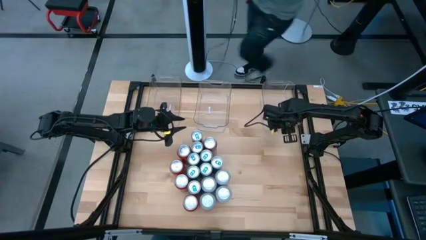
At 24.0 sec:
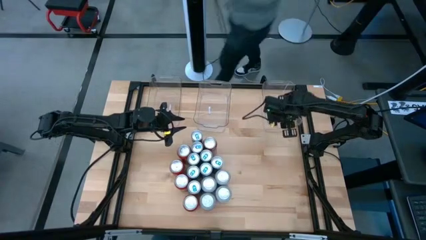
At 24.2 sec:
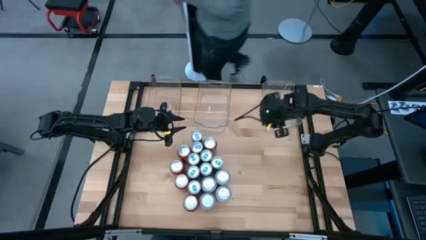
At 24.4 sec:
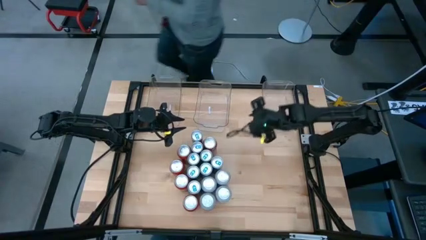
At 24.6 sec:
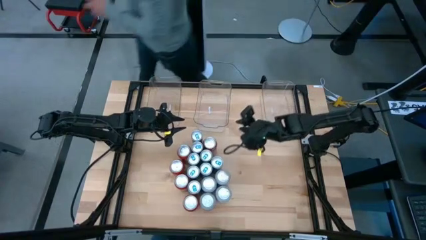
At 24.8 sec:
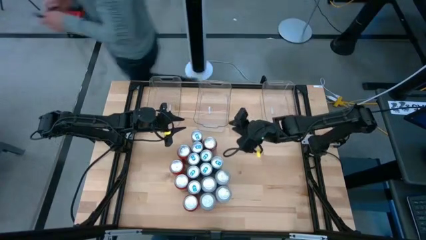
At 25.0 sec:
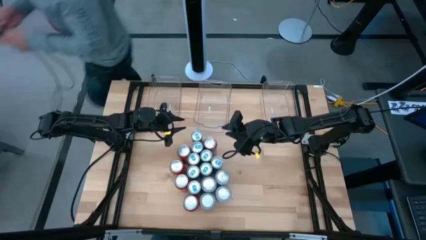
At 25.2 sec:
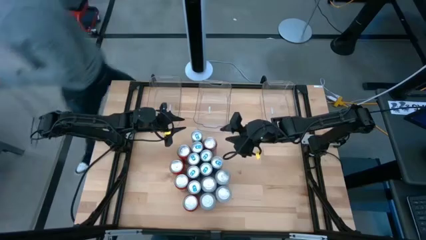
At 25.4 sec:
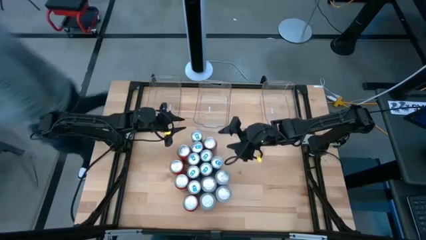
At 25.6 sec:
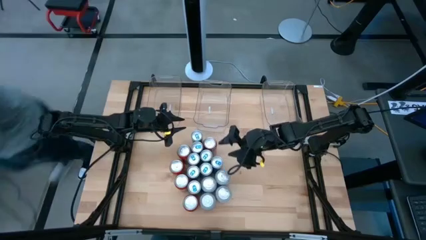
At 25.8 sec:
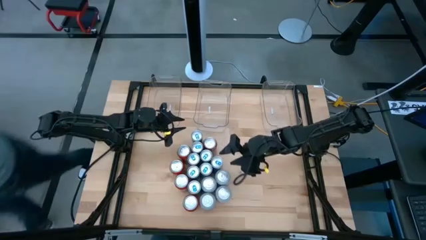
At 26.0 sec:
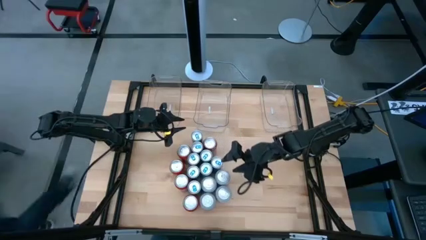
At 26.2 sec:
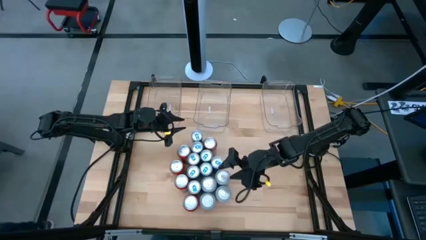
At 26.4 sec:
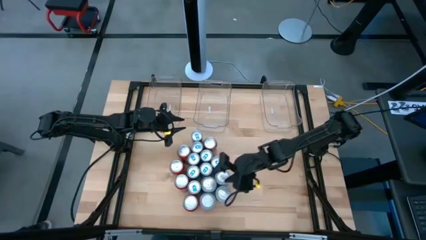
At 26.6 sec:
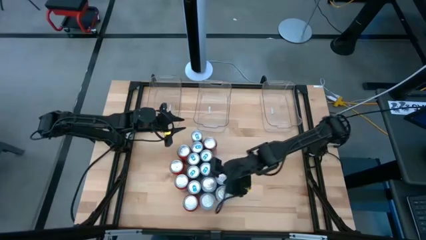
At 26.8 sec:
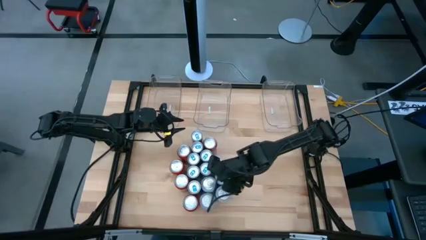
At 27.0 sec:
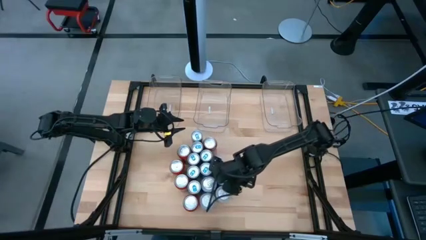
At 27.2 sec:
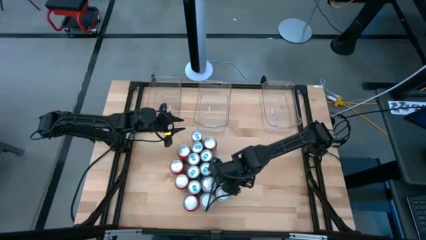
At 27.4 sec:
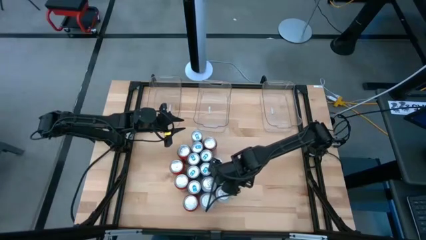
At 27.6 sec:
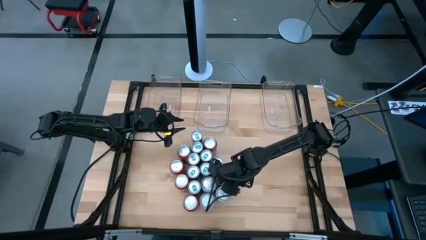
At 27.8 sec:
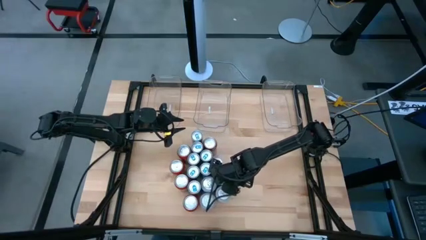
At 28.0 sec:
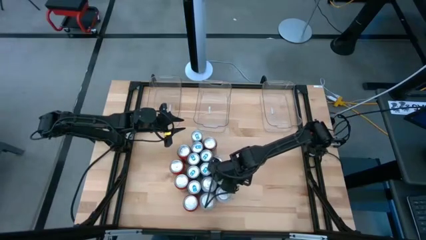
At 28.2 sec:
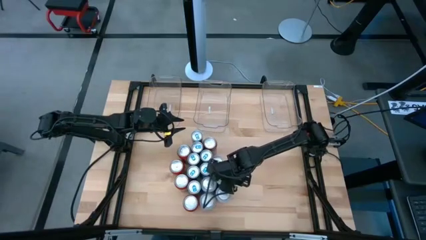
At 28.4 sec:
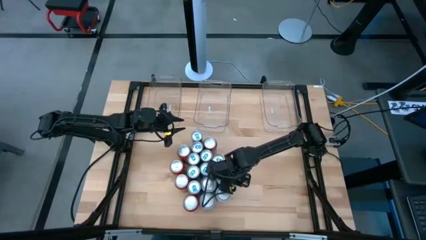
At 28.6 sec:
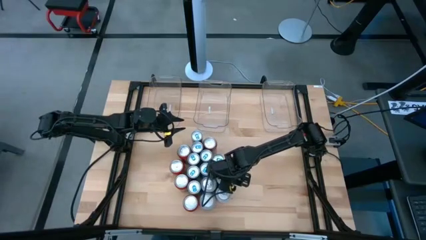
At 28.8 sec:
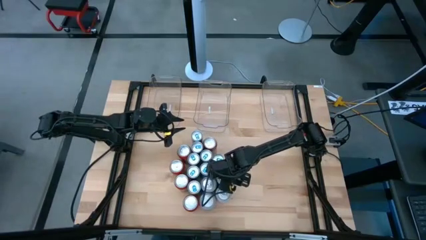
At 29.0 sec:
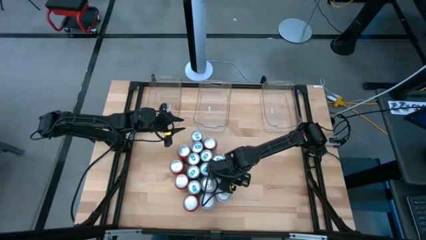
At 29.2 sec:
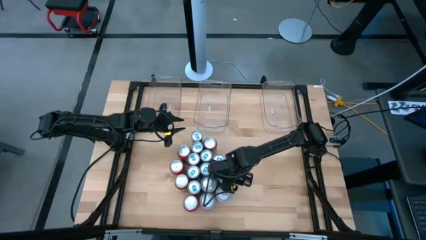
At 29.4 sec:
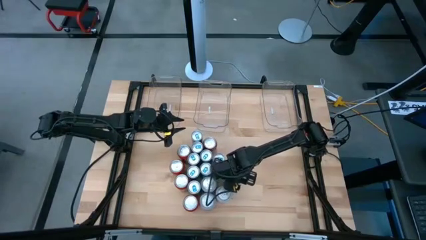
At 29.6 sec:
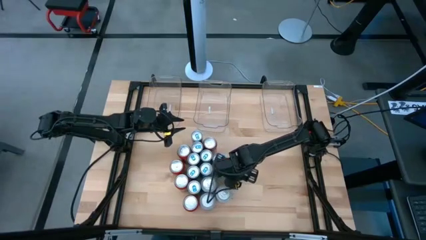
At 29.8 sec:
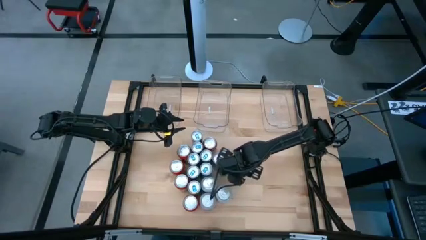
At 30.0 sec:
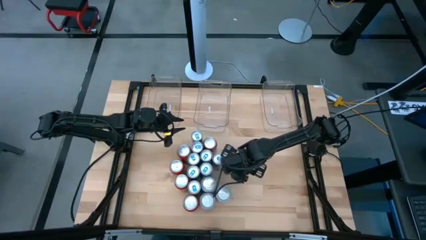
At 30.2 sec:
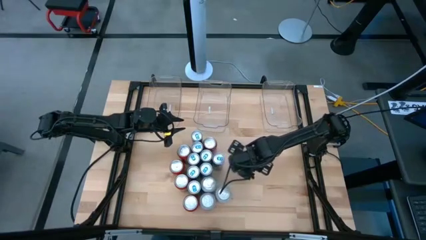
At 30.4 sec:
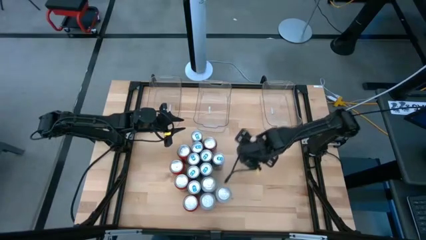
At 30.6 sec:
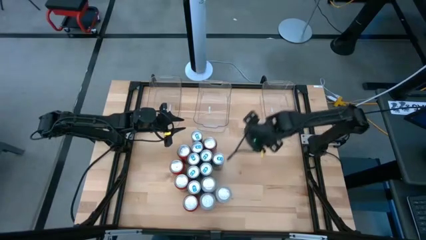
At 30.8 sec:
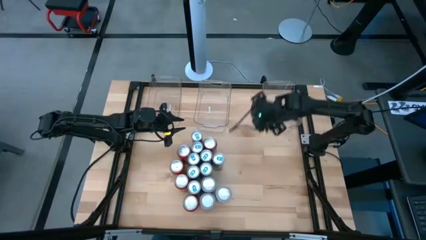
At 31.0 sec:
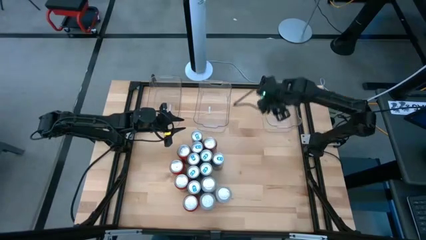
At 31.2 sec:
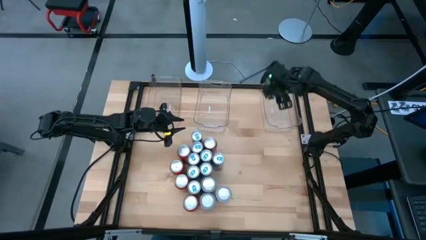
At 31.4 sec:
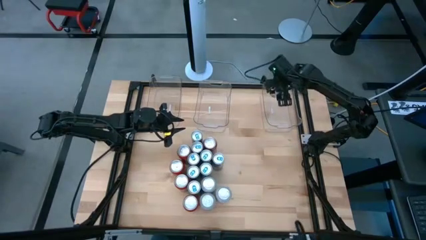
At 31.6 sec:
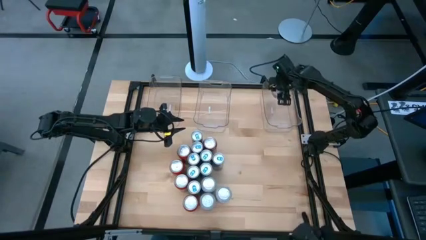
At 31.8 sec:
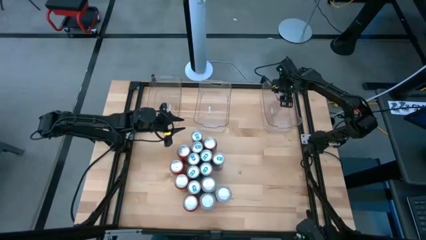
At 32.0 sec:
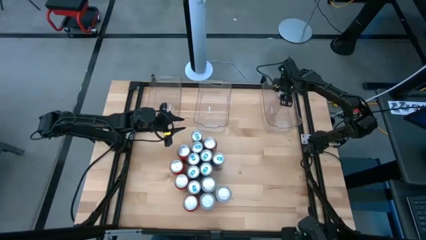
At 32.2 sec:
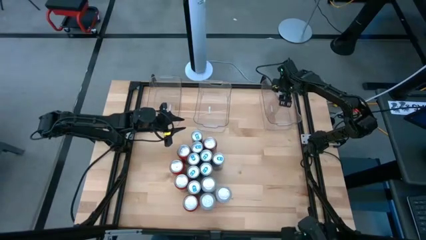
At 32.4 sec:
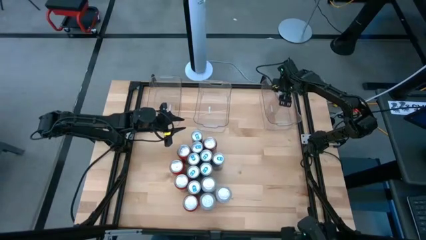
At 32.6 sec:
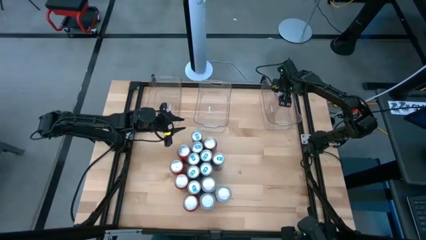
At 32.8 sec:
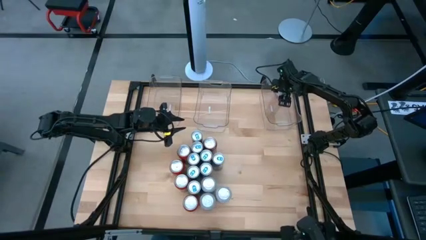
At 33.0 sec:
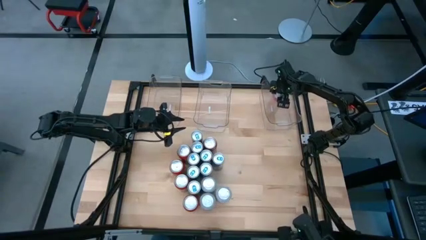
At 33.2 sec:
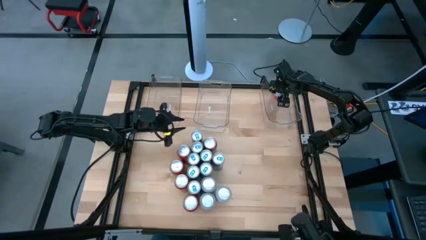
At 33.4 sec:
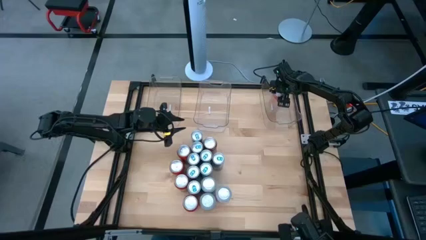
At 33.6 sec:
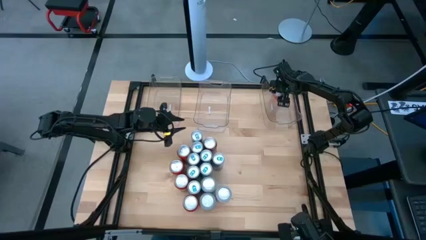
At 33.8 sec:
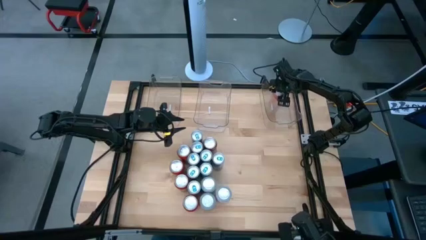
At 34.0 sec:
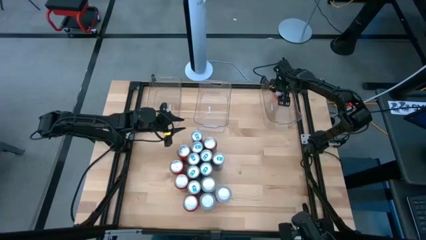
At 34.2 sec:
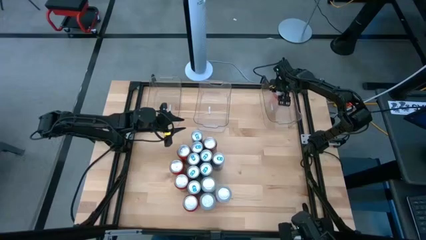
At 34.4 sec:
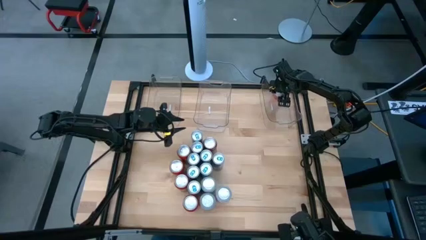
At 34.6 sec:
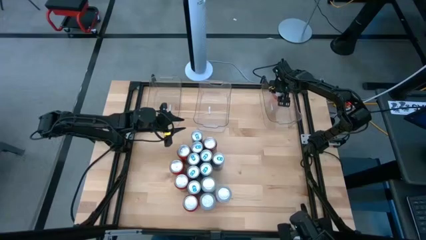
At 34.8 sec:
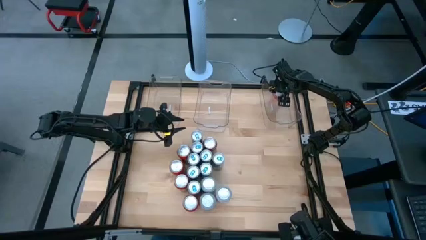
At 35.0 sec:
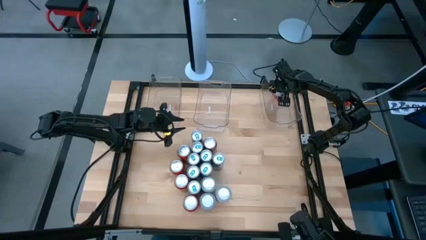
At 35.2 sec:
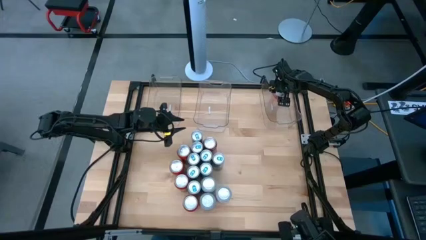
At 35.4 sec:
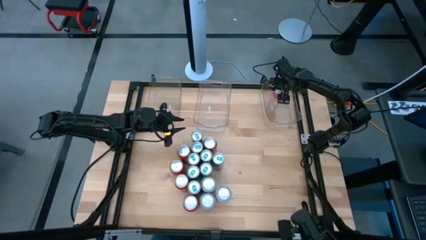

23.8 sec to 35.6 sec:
Task: Sort soda cans
Put the pink-white soda can into the right transparent bin

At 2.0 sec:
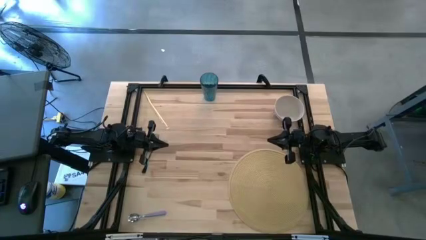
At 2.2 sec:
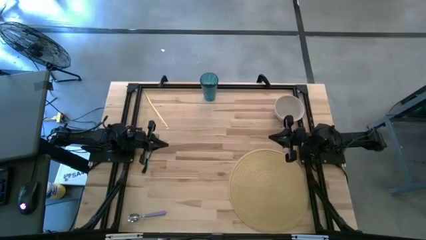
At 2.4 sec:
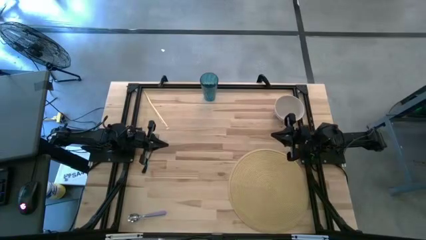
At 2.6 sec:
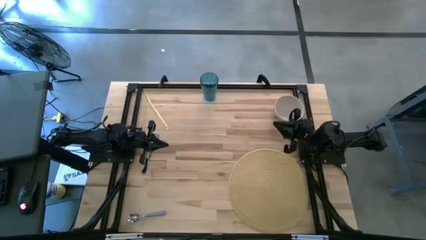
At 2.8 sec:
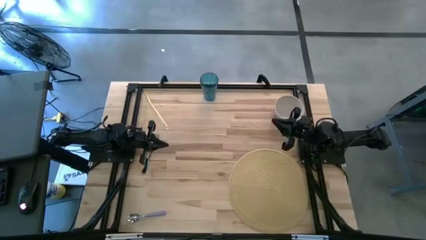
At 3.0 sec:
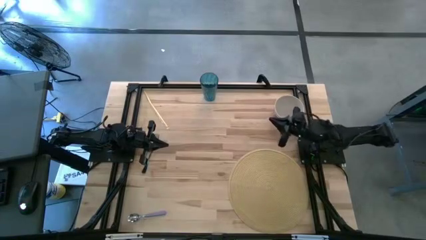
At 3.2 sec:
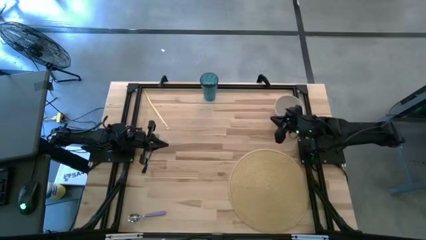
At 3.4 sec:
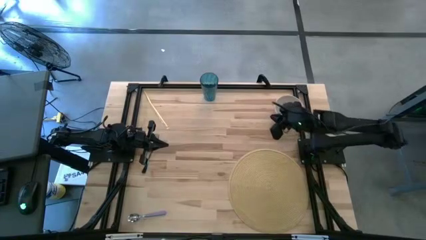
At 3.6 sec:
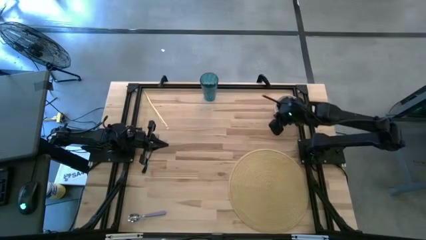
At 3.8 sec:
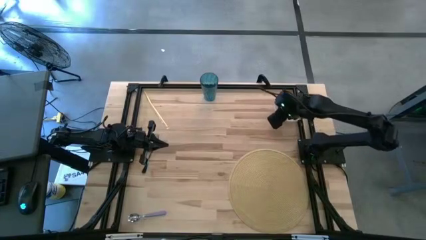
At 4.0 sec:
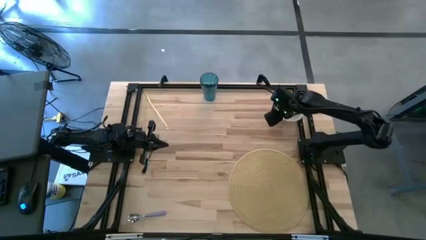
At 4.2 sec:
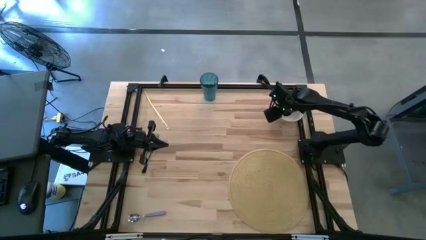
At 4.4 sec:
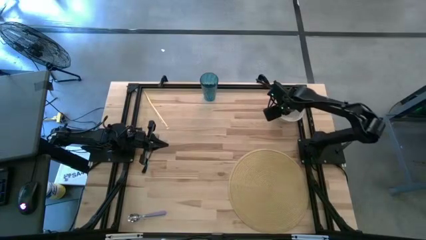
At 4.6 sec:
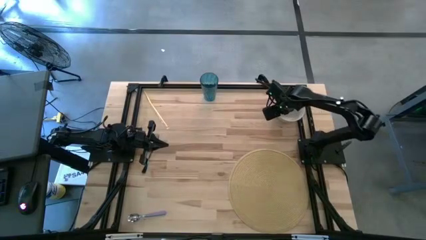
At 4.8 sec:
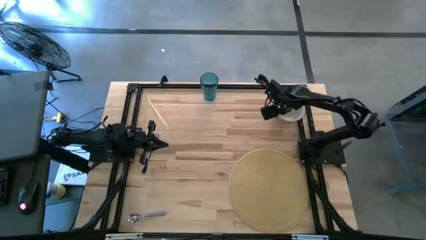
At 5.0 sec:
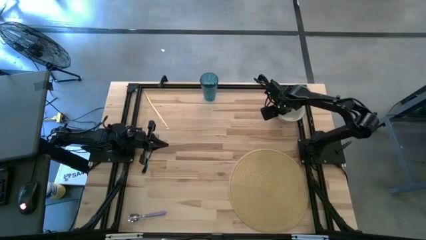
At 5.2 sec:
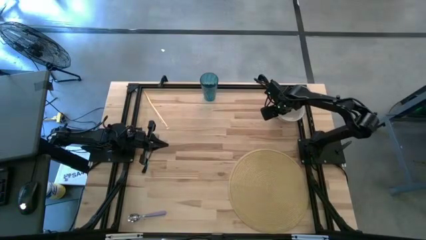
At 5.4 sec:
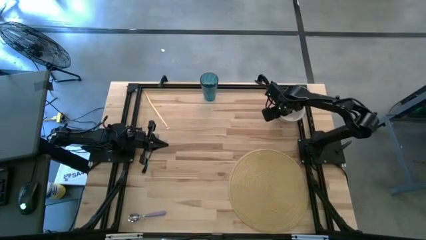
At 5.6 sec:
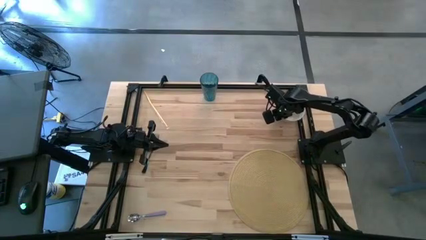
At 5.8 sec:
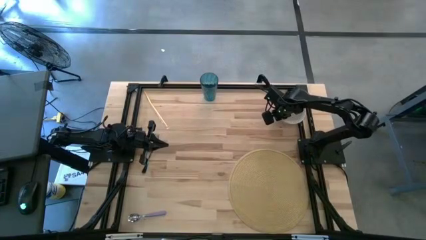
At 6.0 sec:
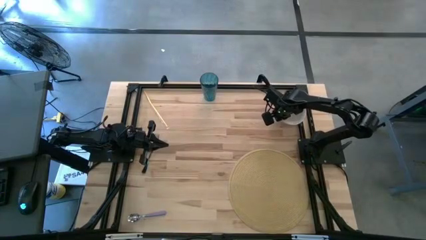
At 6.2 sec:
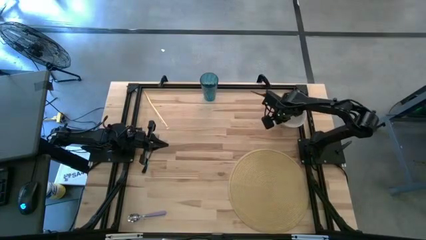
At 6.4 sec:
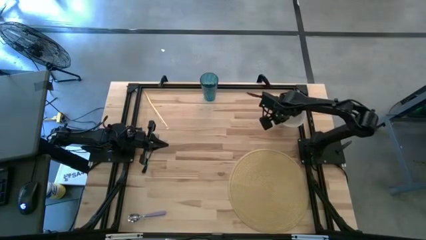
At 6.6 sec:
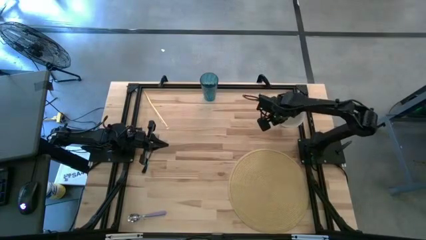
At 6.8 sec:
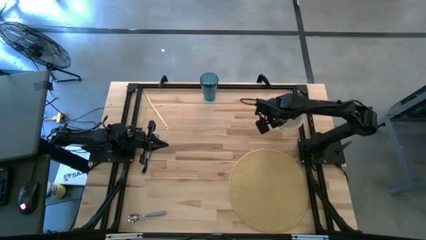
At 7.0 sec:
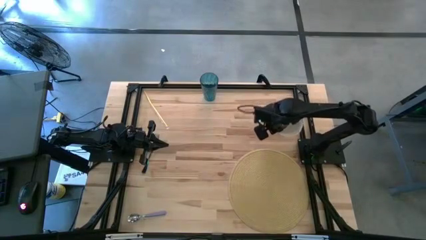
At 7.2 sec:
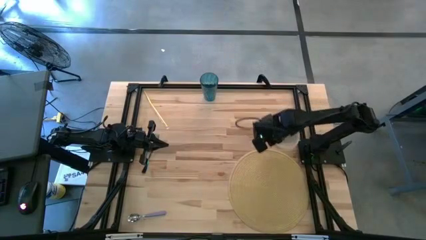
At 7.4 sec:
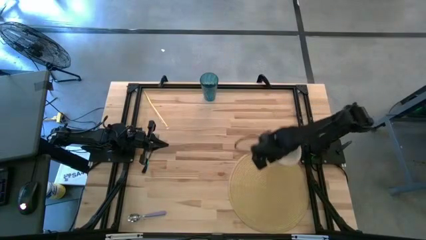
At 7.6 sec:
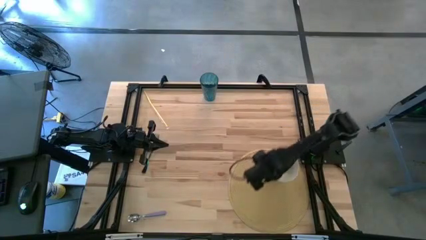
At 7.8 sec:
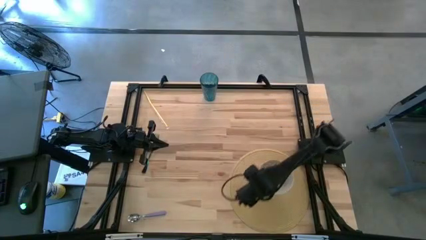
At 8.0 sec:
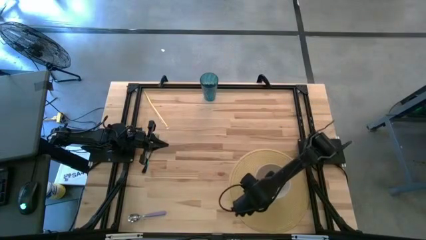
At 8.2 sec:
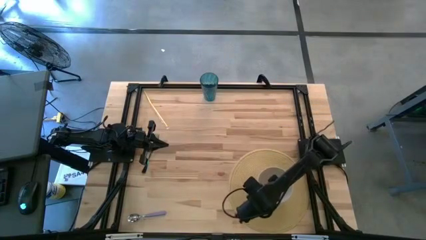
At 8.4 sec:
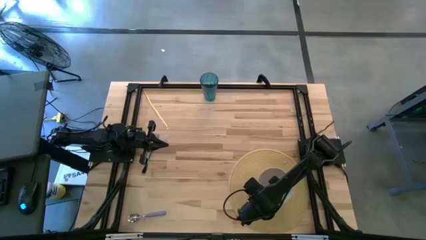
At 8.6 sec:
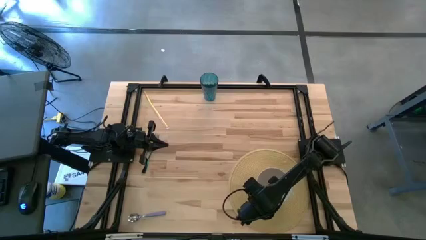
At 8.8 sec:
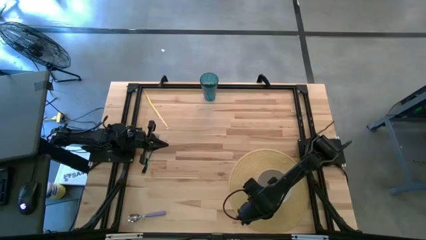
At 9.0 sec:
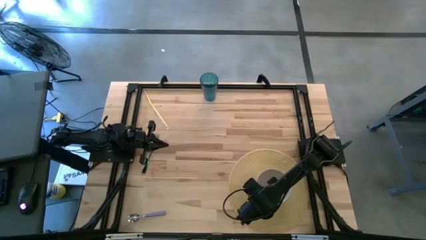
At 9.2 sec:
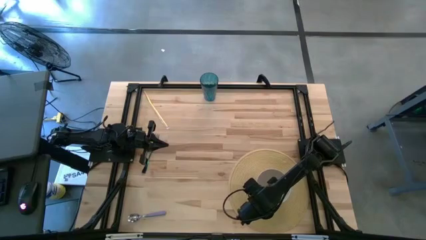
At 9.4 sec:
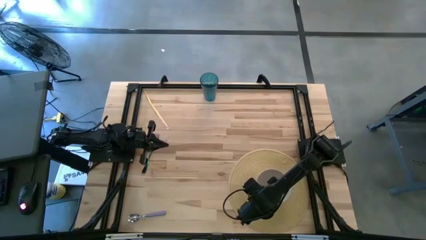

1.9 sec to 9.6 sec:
Task: Pick & Place Utensil
Put the white bowl on the brown mat
